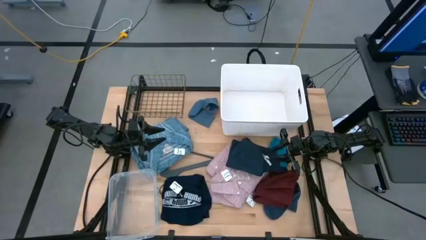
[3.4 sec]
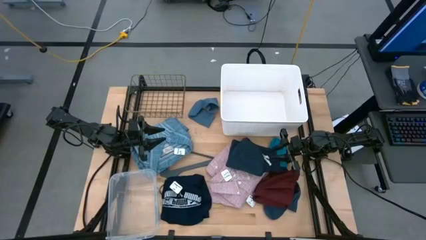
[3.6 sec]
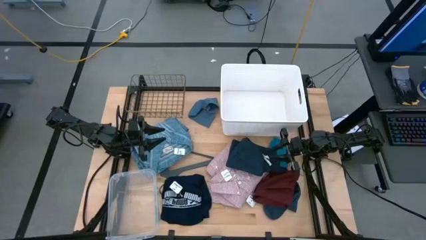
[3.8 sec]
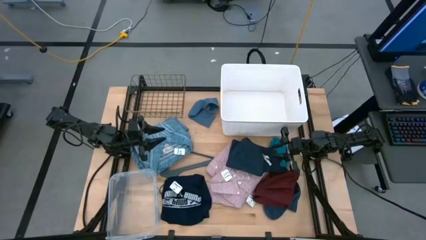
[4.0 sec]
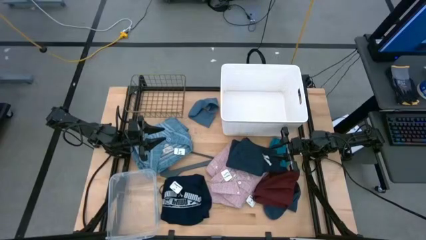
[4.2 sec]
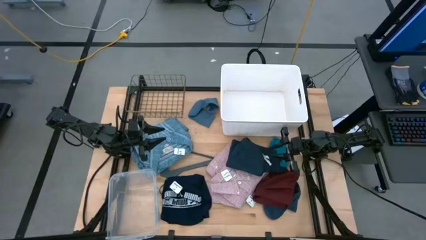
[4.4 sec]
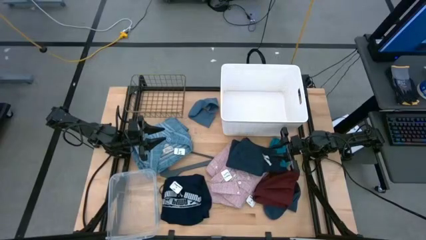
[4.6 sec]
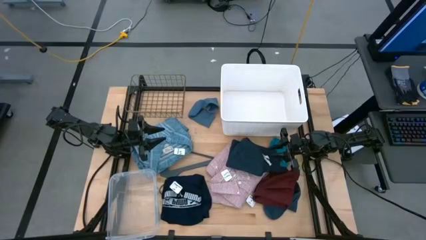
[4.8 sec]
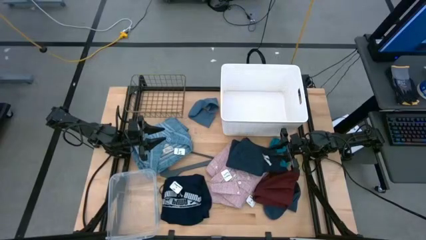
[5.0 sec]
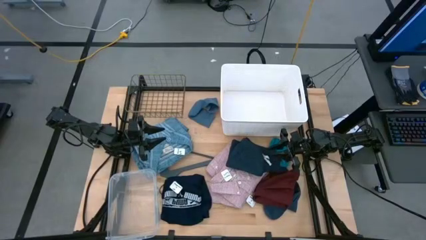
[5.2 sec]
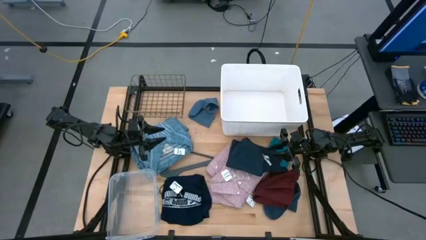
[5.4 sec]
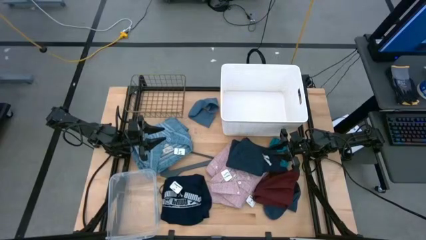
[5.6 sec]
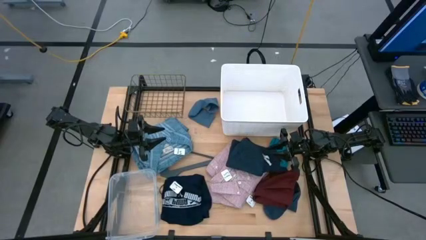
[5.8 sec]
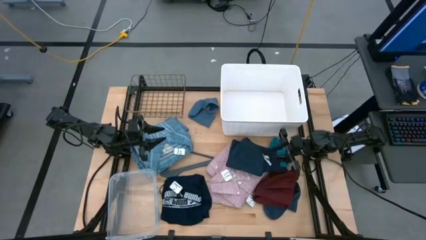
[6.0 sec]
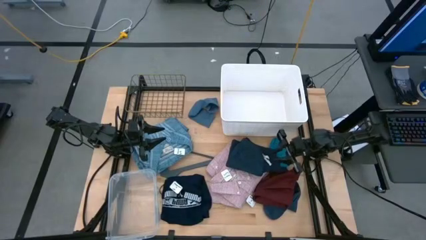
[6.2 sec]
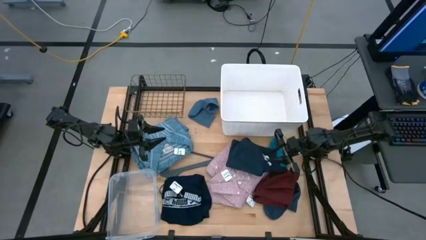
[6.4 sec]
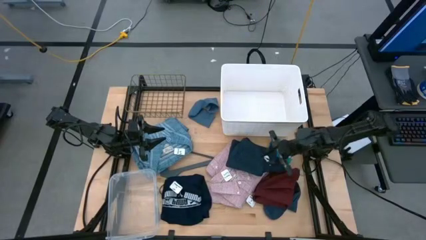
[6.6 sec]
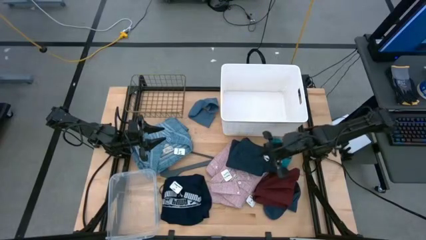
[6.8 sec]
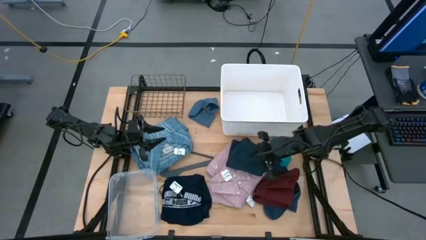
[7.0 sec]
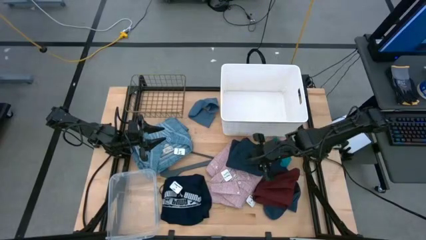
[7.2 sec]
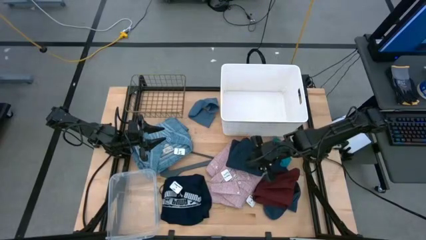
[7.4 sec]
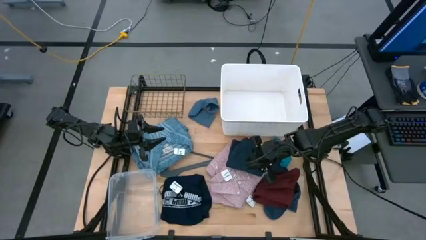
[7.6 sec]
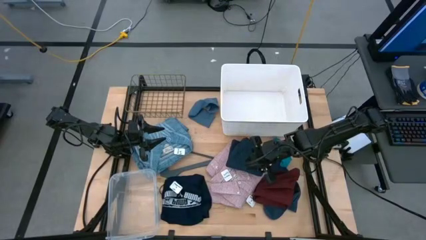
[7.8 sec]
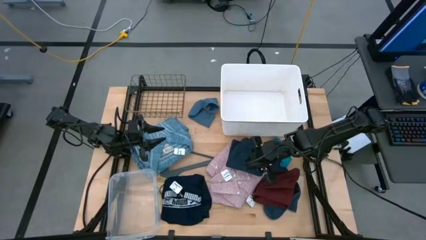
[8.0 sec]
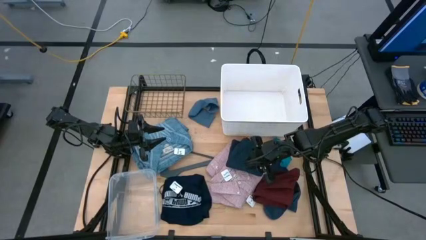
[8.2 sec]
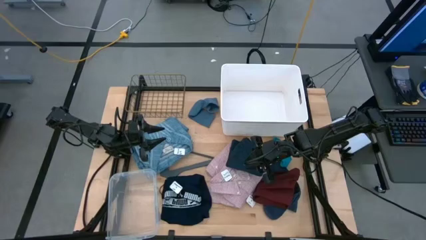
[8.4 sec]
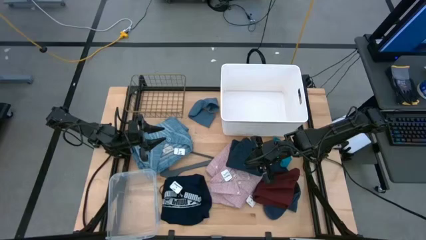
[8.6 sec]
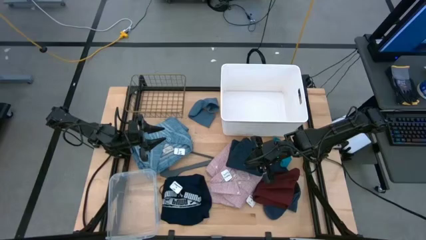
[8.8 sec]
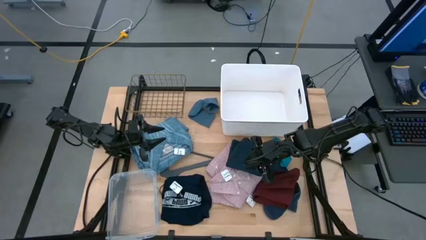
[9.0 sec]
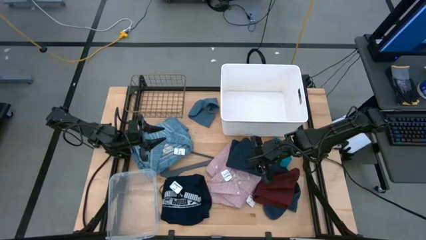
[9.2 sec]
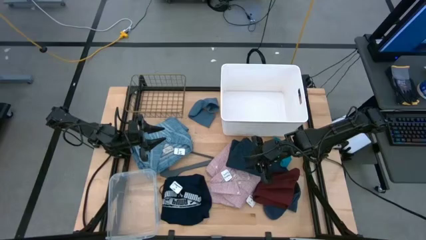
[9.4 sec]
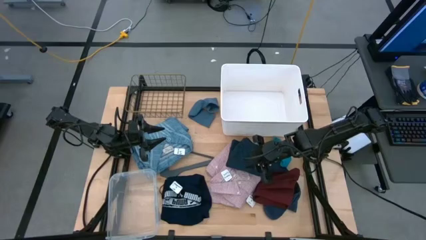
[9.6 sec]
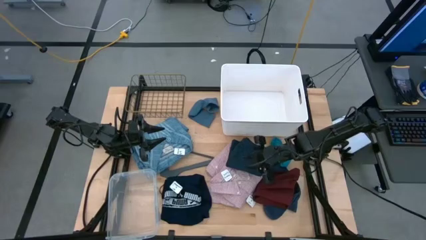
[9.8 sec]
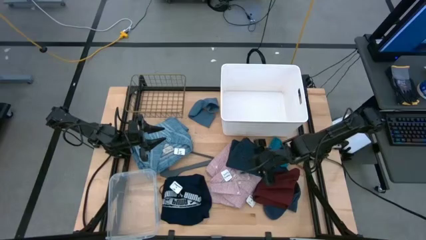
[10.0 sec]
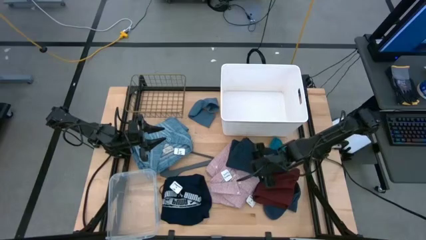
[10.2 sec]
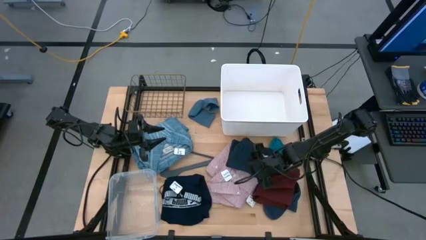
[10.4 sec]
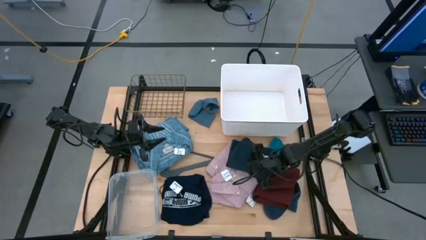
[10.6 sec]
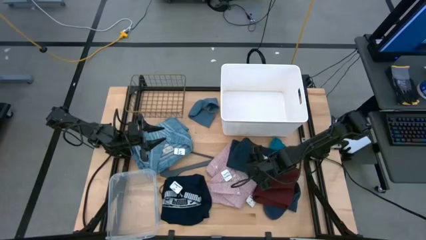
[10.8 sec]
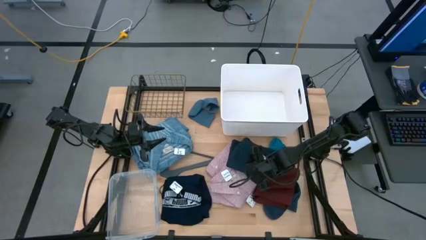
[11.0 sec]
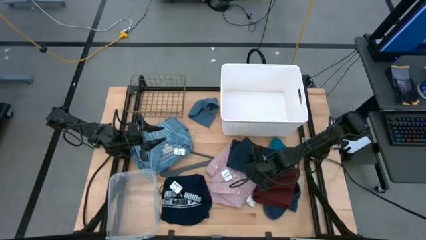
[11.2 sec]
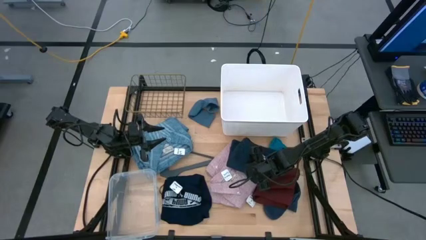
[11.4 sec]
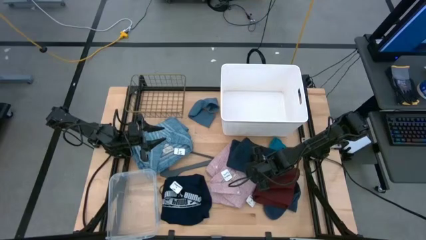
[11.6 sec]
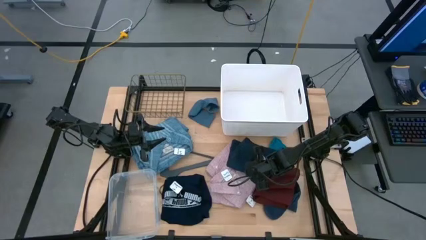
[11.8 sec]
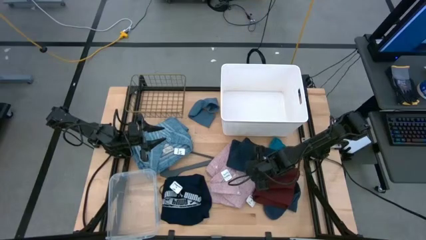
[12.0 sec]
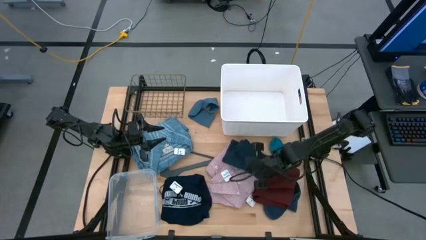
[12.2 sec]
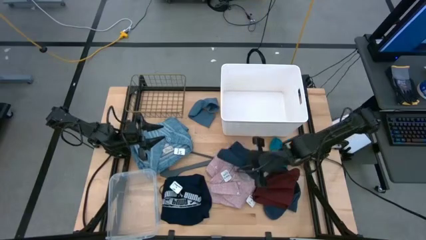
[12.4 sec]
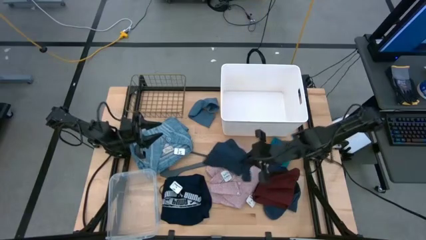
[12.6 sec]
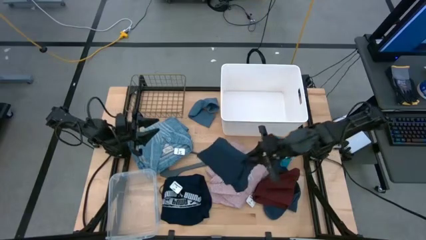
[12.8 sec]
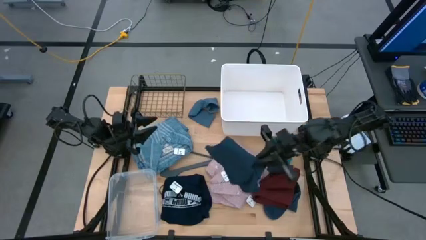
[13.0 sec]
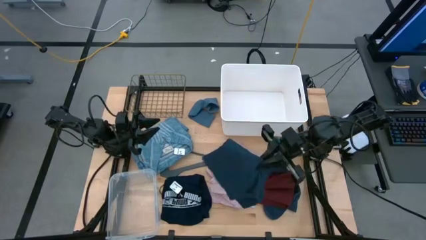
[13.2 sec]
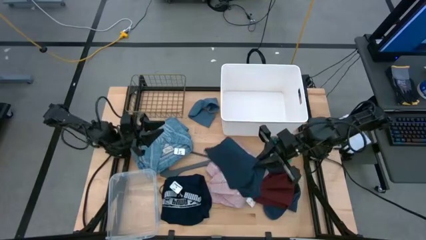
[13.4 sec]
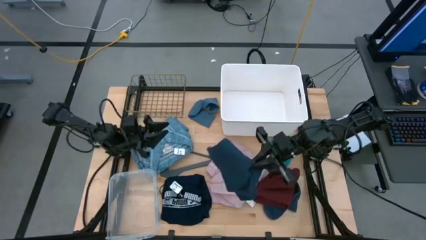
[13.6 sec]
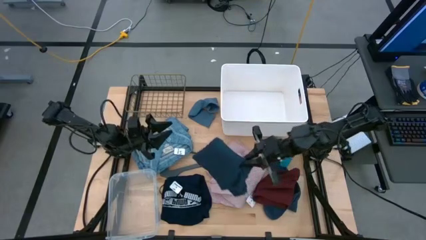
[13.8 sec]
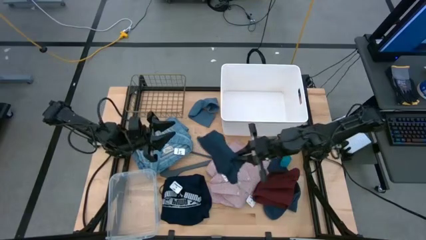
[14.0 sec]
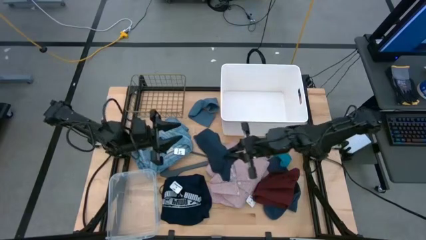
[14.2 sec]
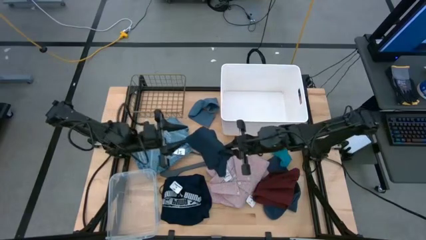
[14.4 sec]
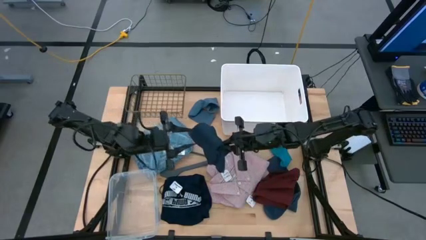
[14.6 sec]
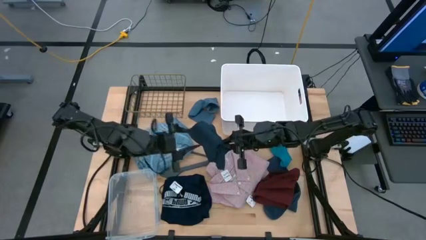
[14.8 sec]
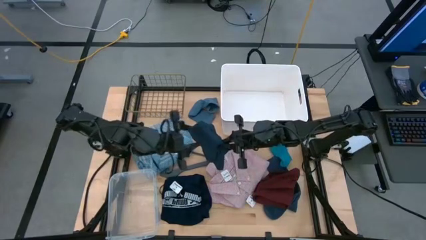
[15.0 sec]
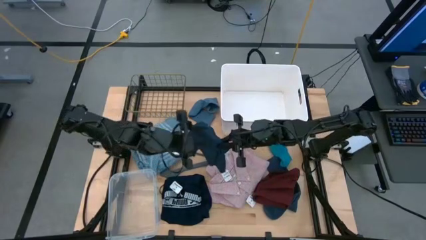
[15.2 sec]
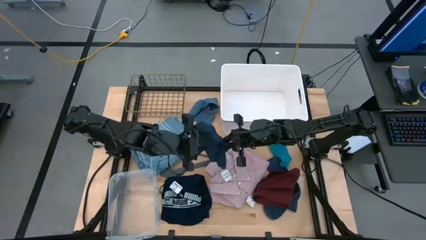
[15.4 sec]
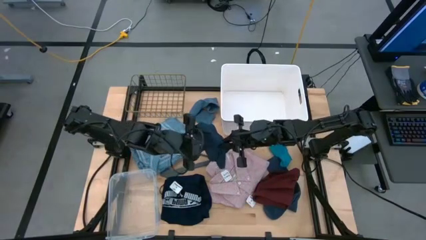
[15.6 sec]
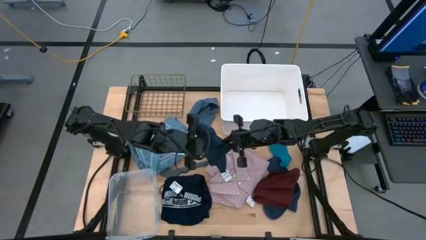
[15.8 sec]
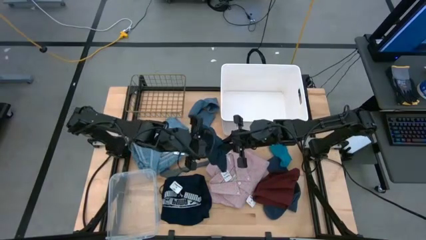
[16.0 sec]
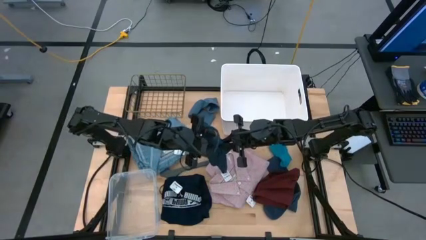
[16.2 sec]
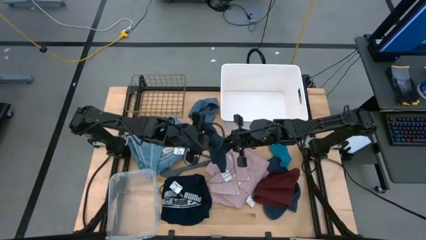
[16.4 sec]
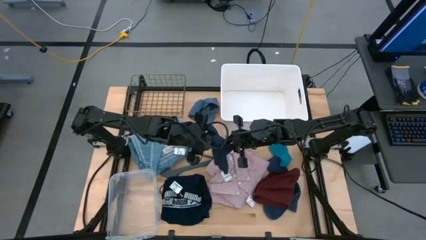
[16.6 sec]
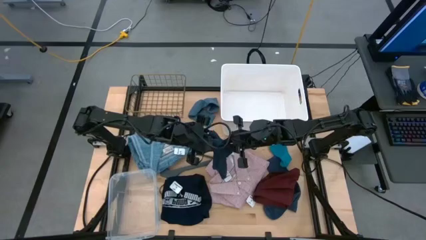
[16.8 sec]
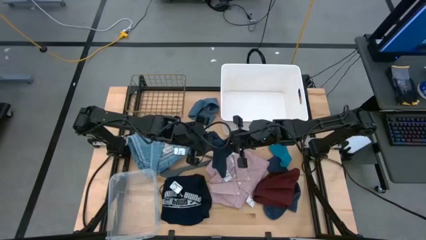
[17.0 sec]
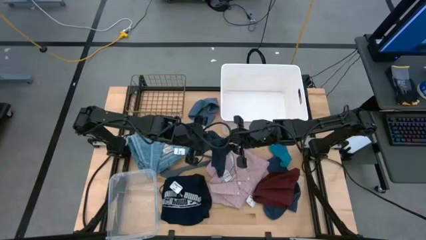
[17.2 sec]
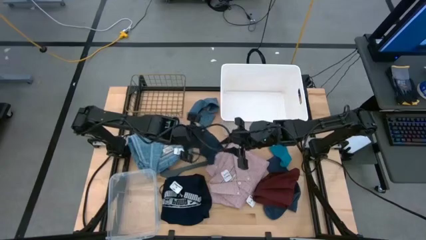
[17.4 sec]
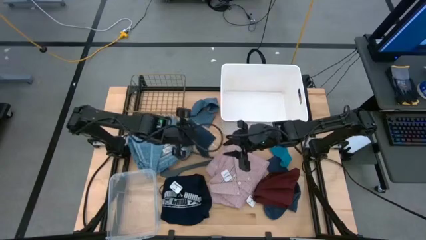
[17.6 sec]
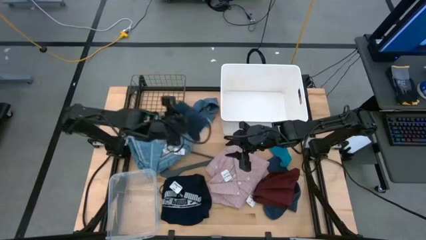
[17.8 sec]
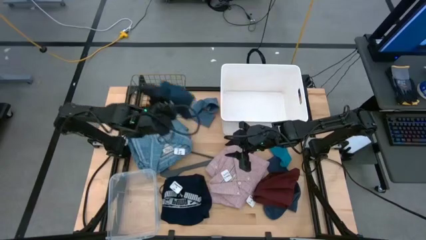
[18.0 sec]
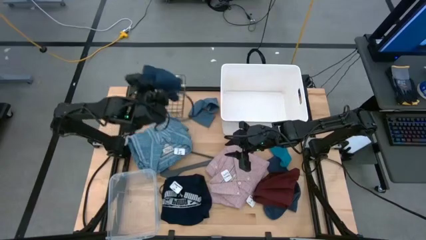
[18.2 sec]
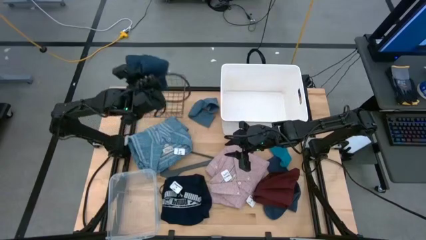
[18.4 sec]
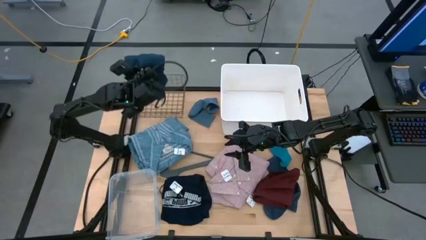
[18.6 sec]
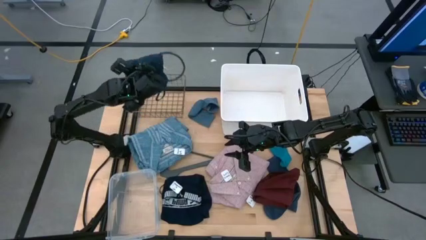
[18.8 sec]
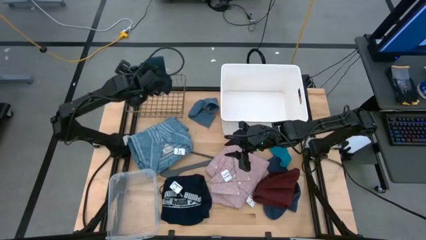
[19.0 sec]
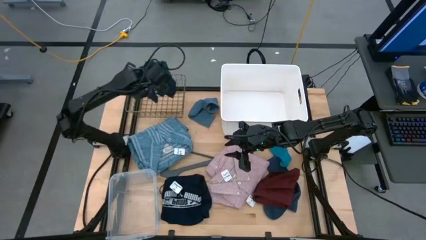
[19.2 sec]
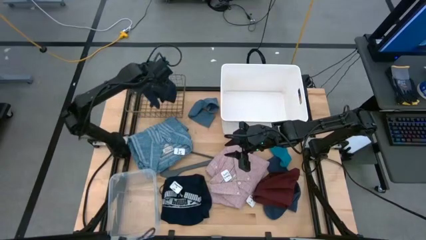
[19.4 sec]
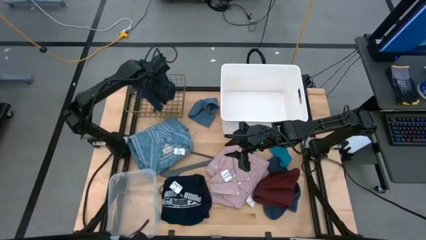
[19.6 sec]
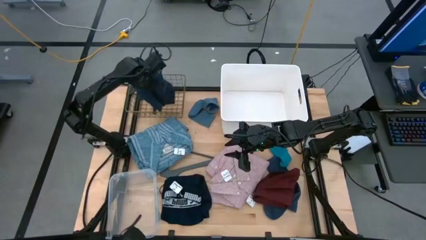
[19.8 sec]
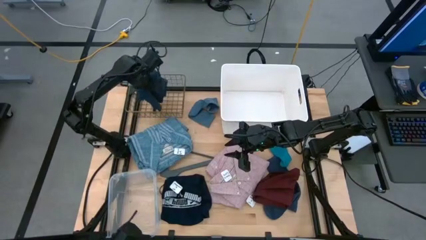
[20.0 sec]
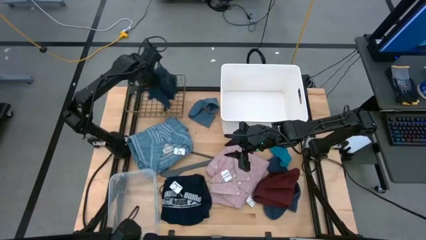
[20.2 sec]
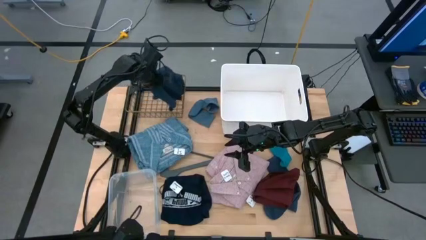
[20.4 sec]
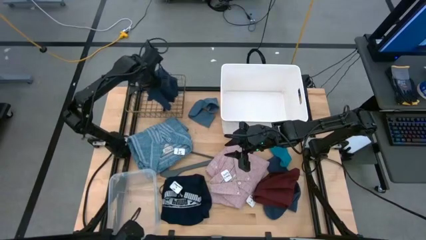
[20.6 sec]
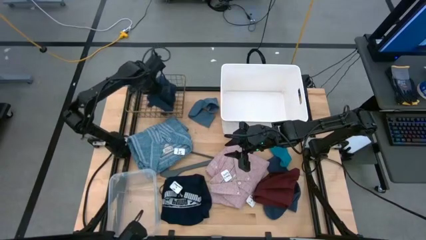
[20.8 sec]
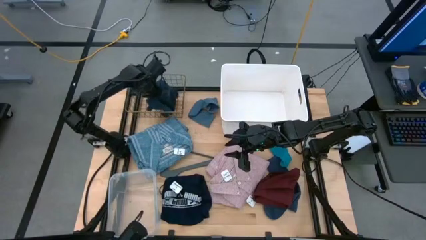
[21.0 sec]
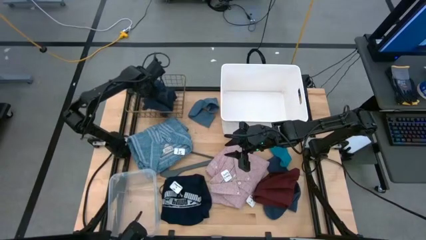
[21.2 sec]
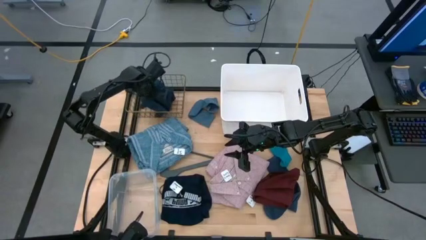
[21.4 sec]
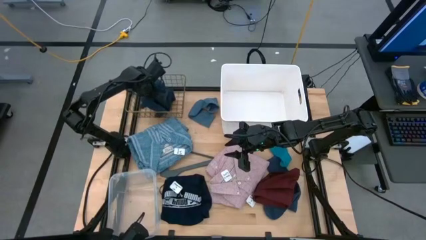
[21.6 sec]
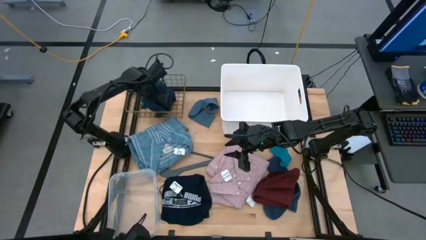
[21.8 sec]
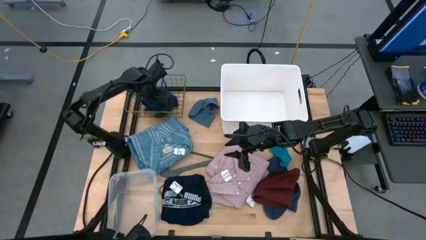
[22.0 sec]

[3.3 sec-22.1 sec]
Task: Pick & Place Cloths
Put the dark blue underwear into the black basket
